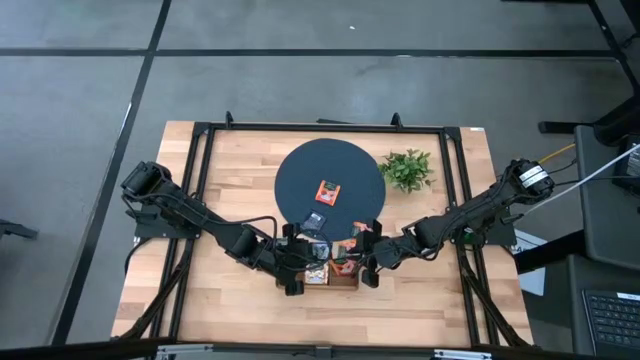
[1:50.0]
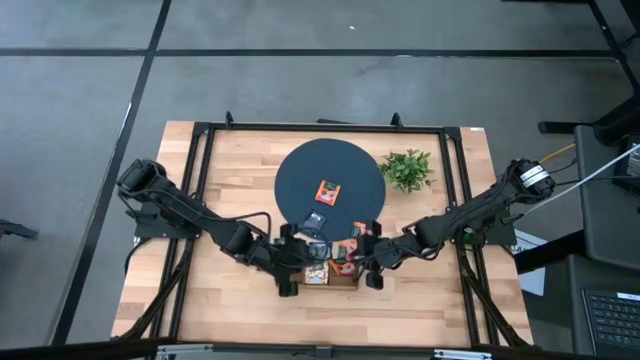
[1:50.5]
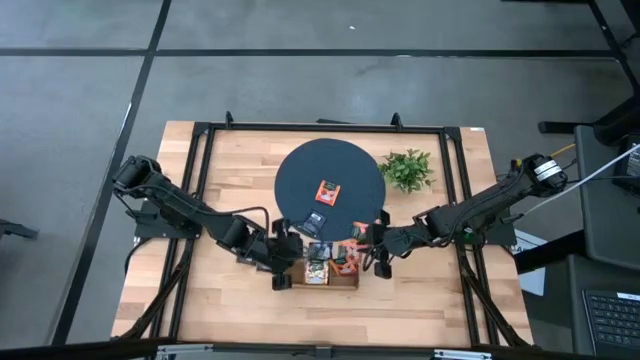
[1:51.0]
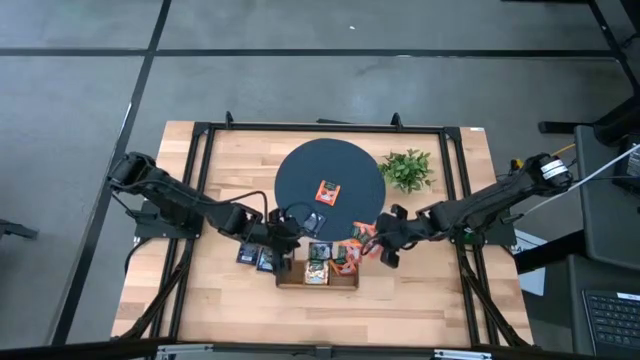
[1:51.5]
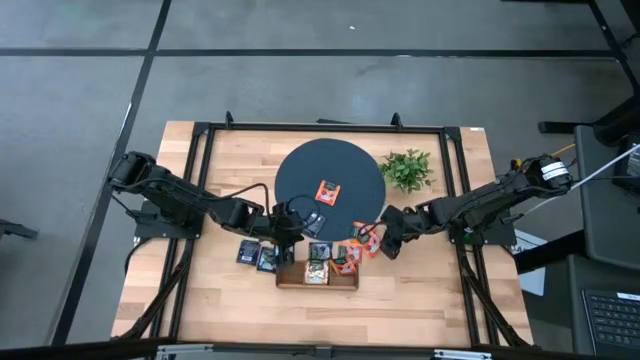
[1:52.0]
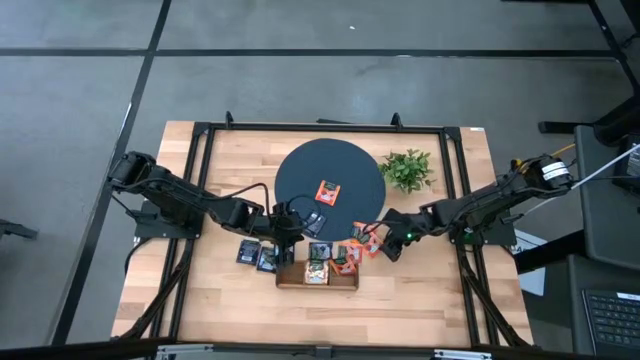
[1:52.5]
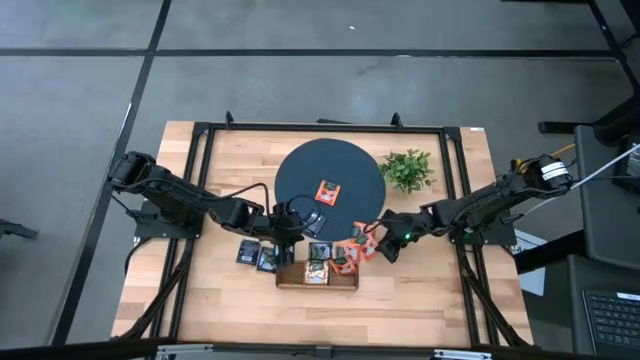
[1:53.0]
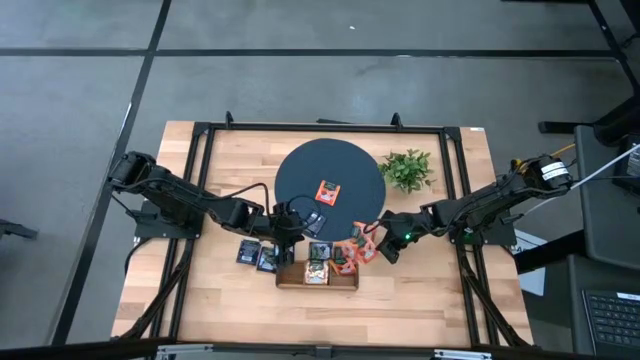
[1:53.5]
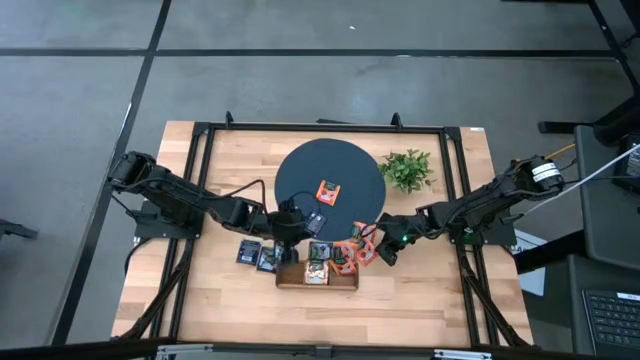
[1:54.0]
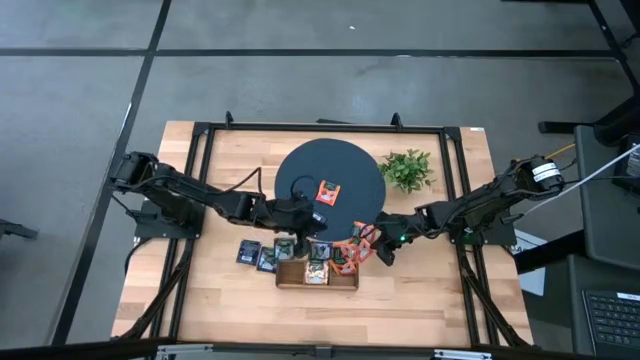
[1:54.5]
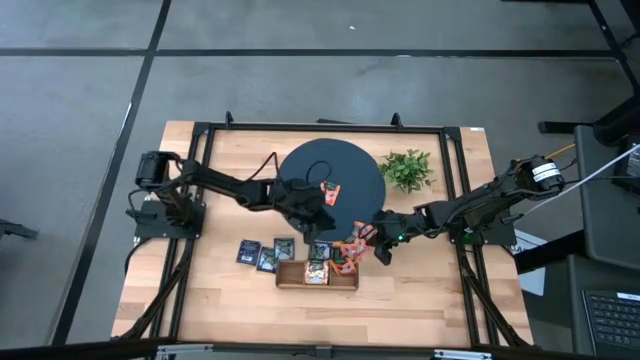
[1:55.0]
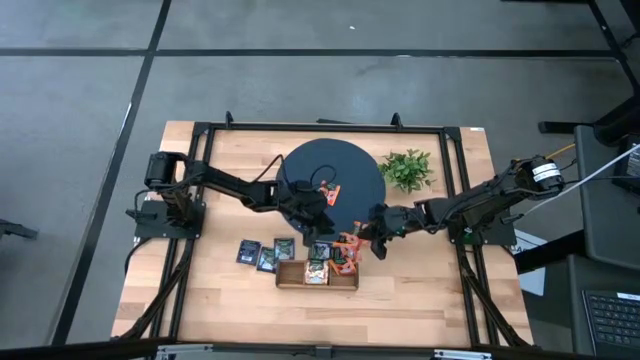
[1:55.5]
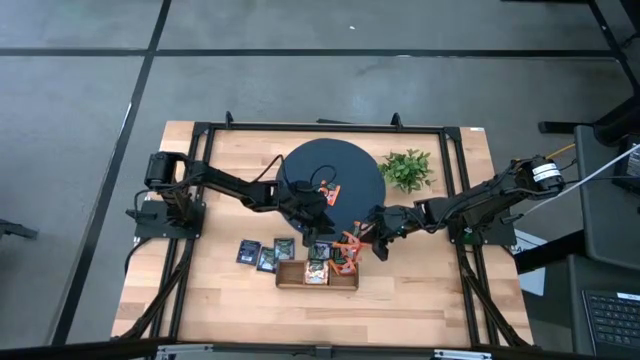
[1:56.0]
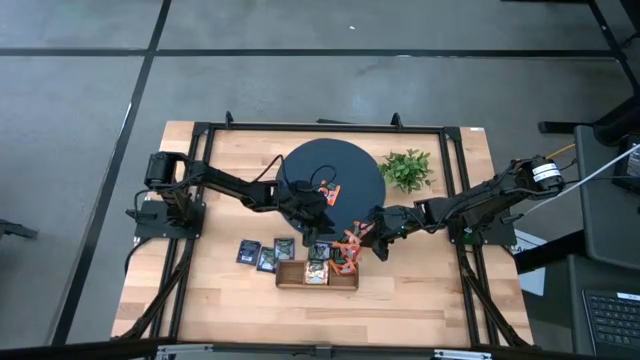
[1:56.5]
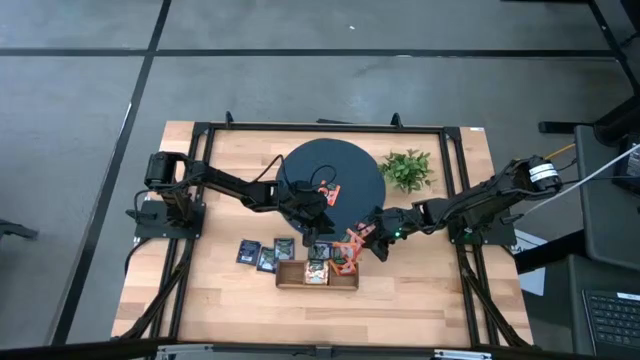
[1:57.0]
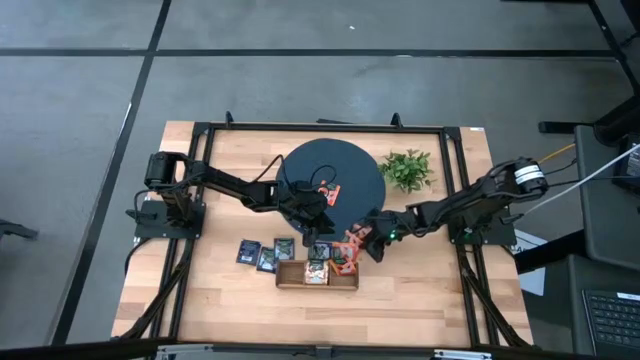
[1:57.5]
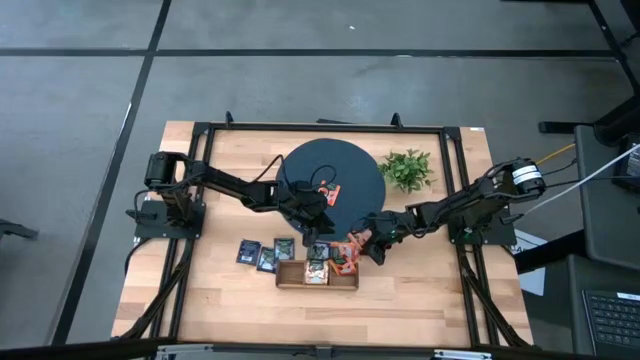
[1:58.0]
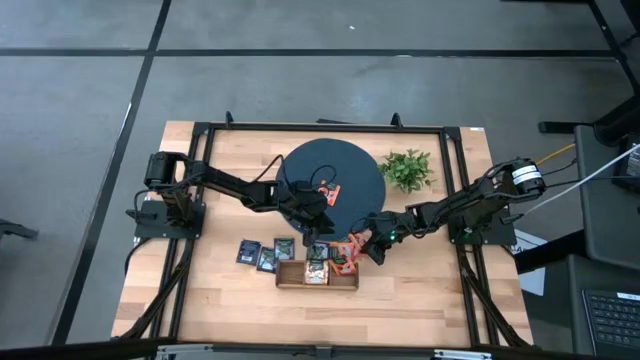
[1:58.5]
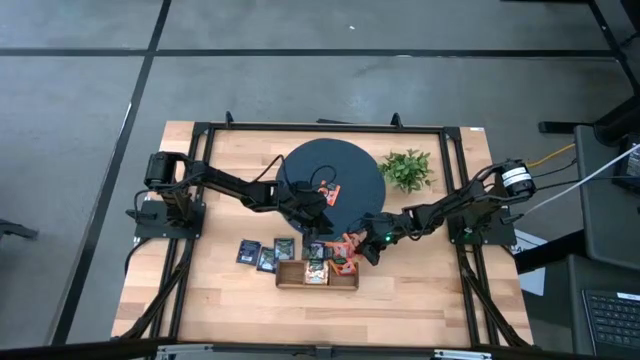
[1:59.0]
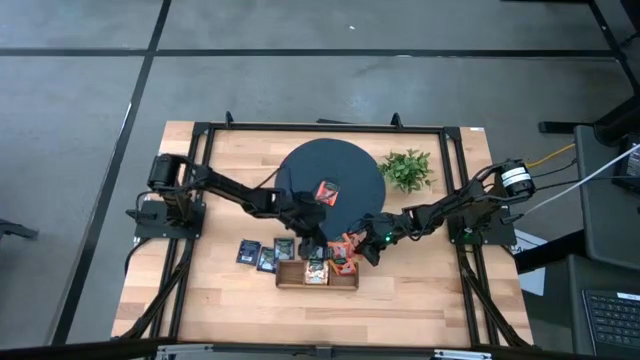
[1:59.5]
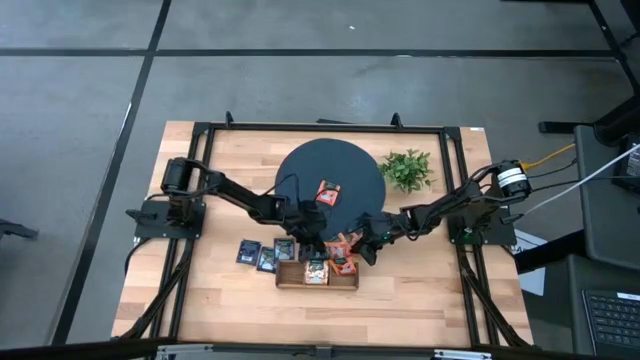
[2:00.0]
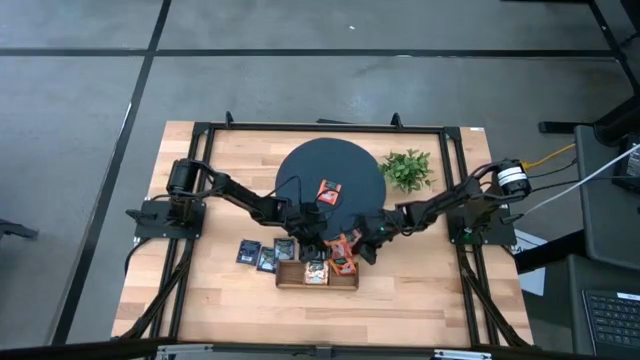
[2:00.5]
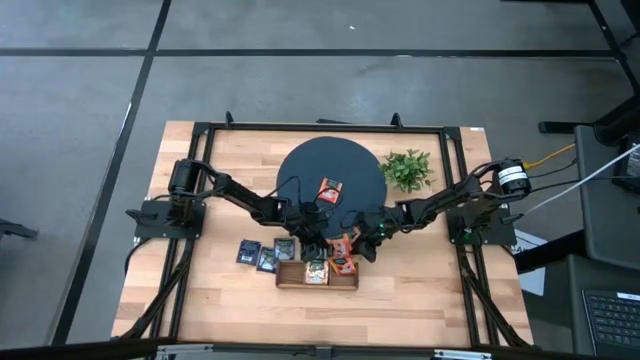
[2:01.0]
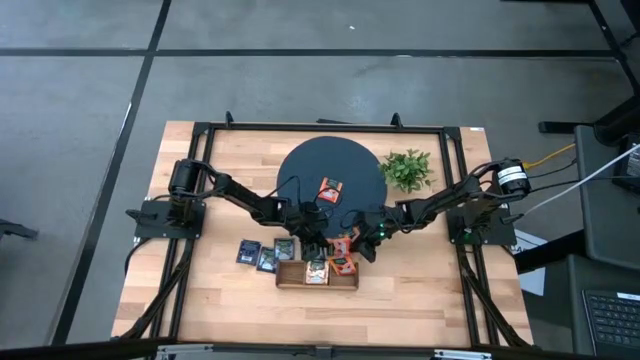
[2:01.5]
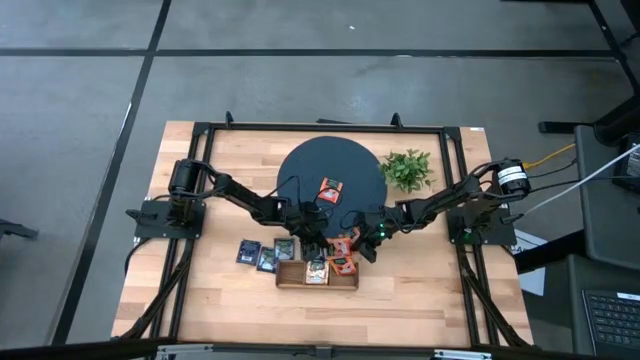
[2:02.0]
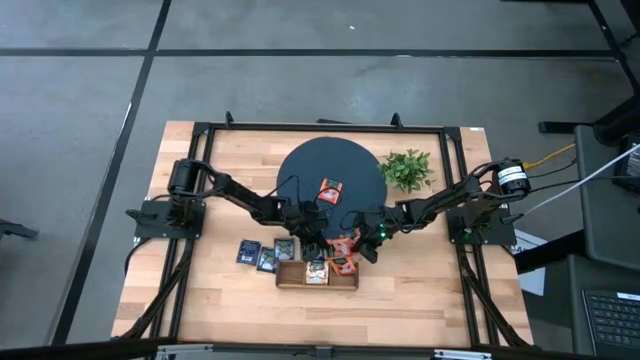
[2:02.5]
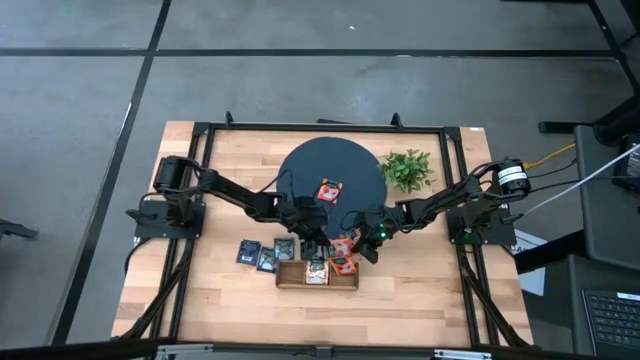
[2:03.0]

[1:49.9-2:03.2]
Task: Pick & Place Tea
Put the orange tea bag into the right section of the wooden organizer

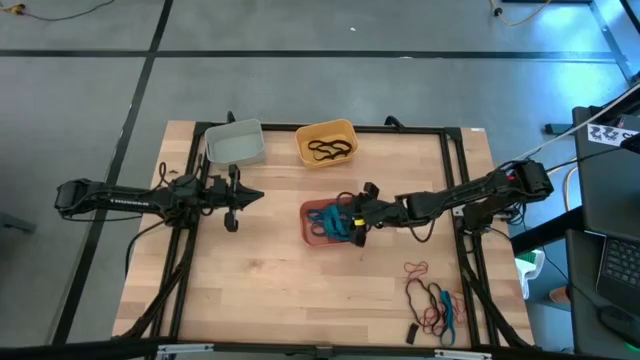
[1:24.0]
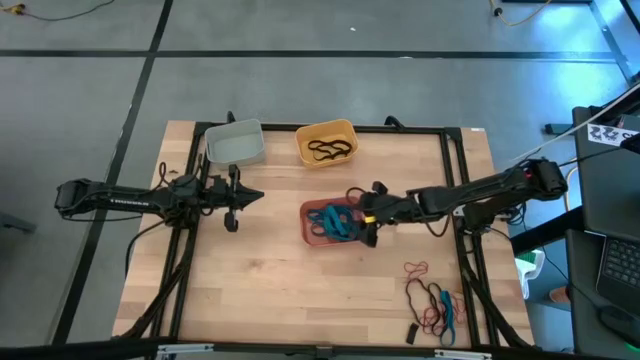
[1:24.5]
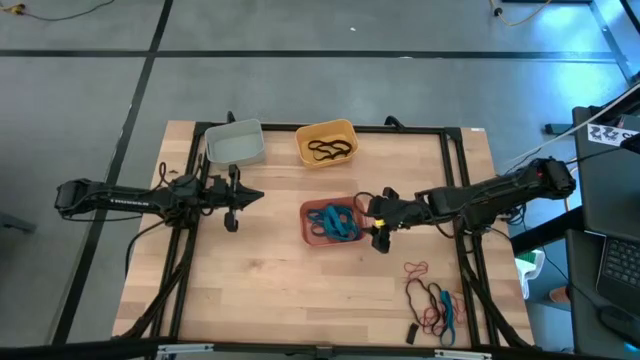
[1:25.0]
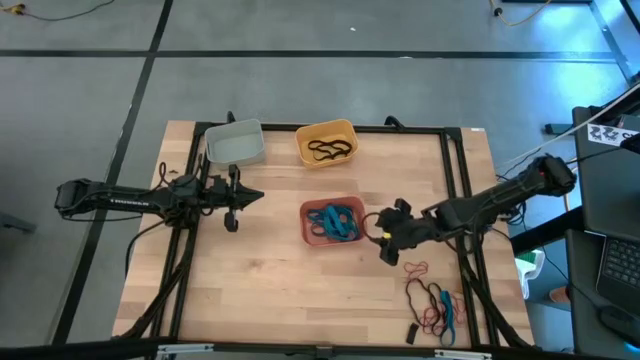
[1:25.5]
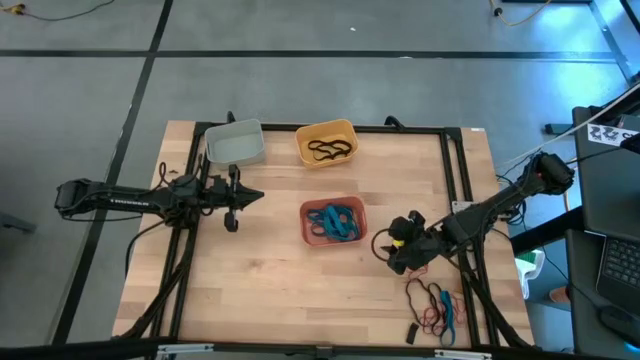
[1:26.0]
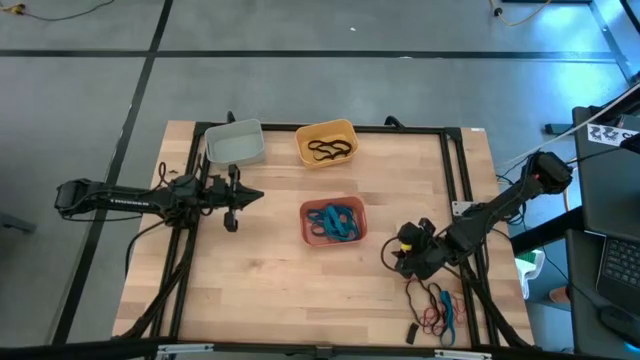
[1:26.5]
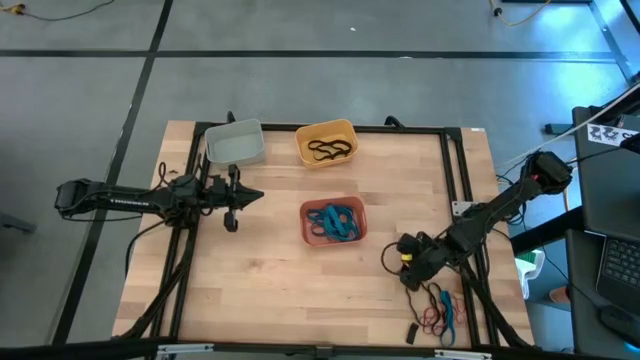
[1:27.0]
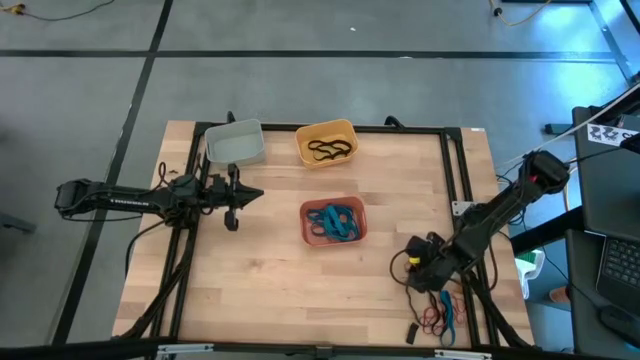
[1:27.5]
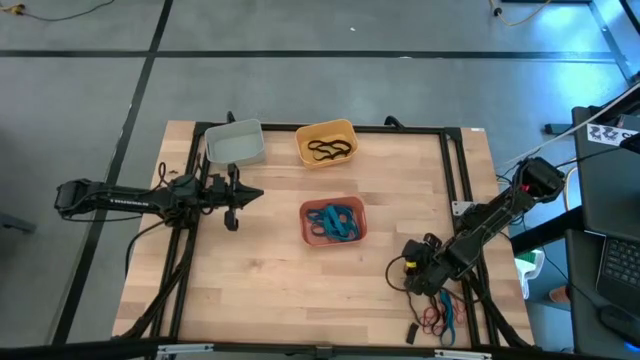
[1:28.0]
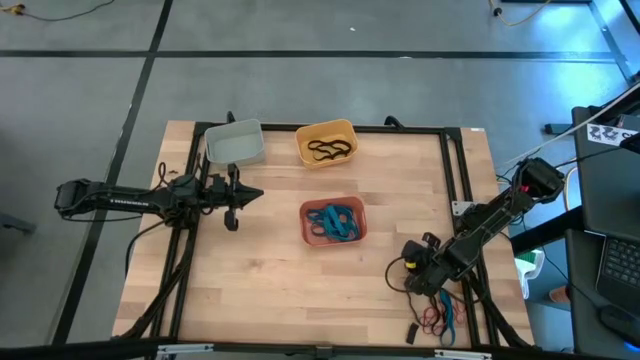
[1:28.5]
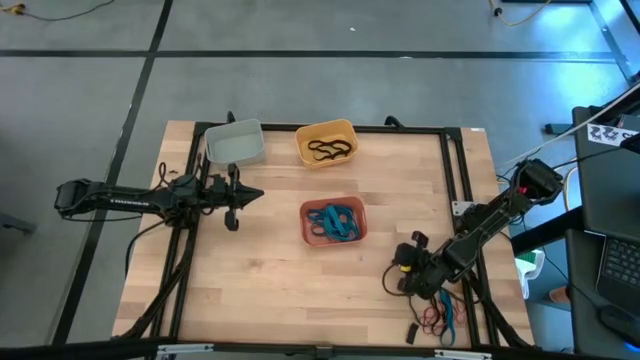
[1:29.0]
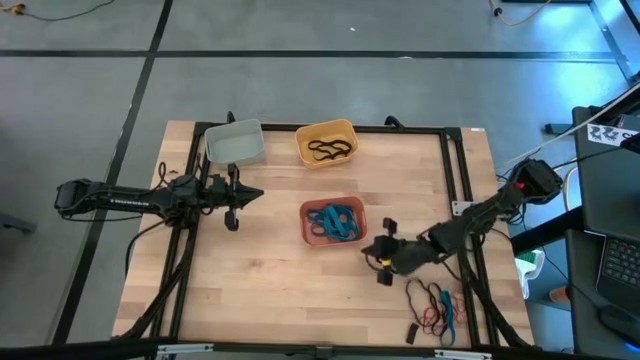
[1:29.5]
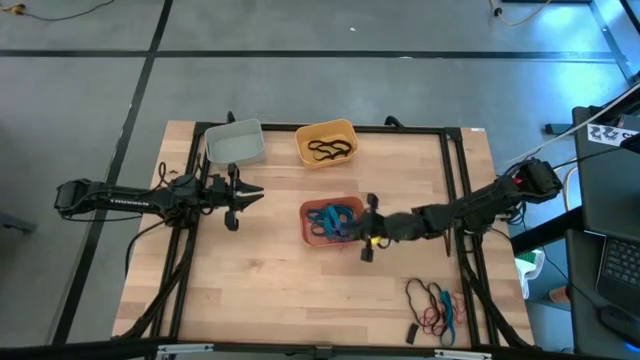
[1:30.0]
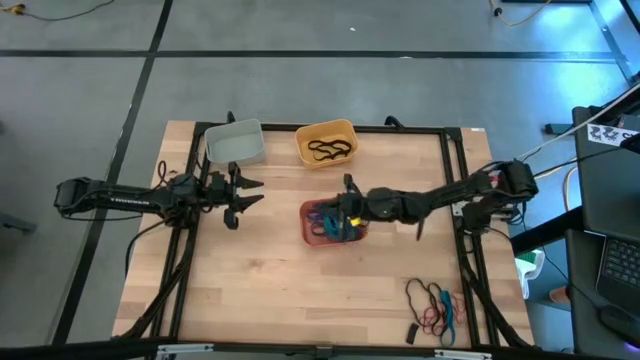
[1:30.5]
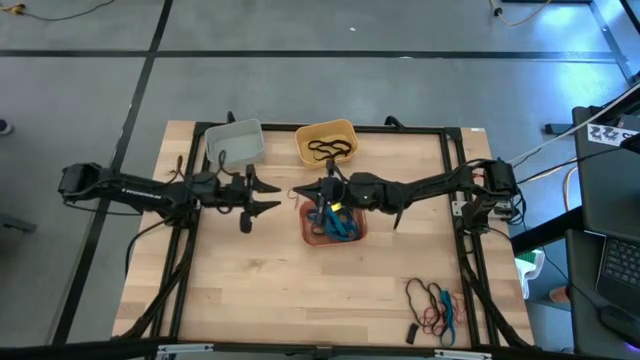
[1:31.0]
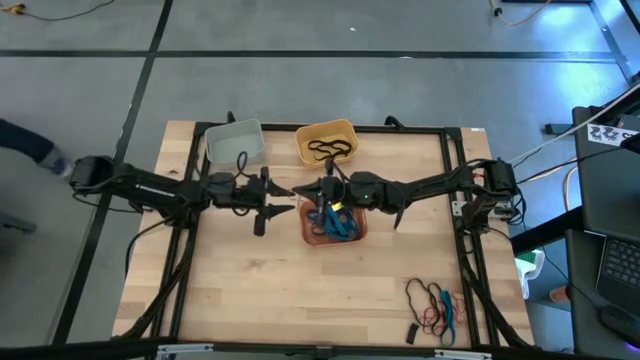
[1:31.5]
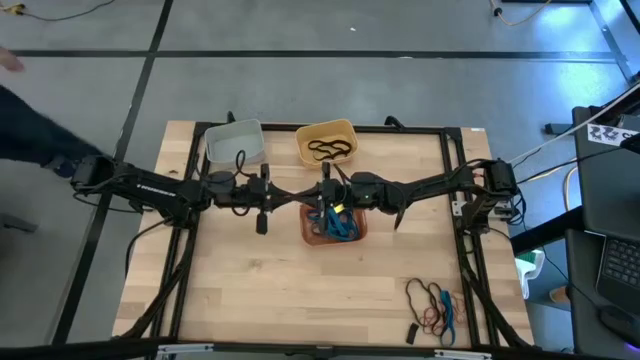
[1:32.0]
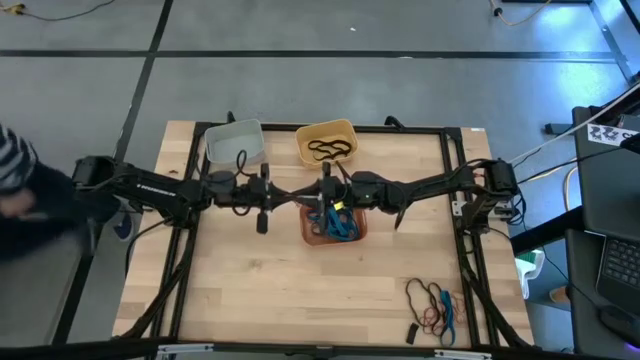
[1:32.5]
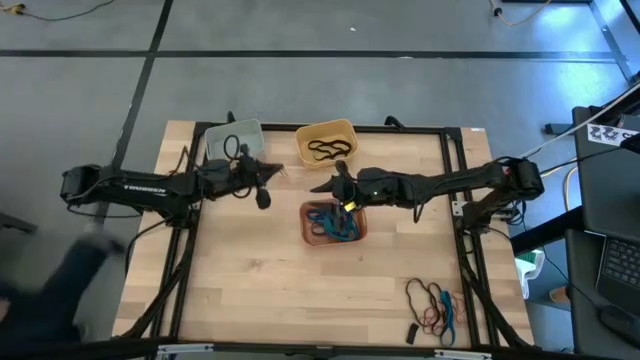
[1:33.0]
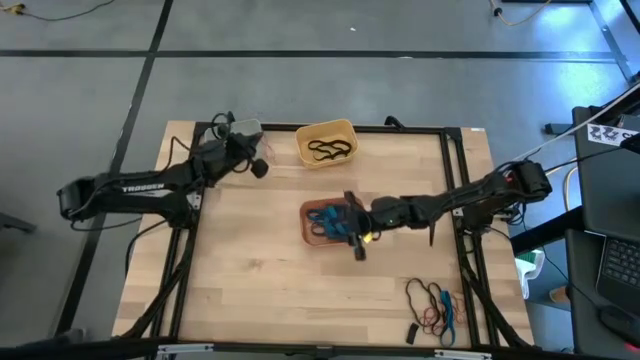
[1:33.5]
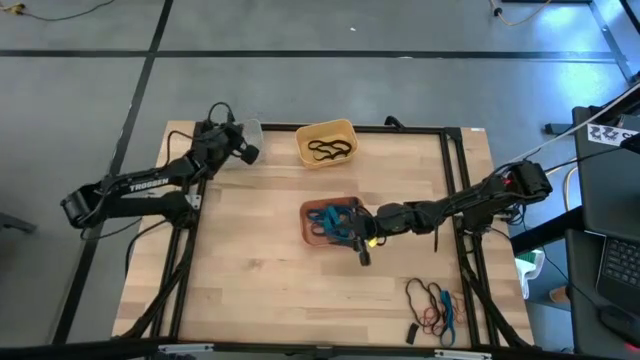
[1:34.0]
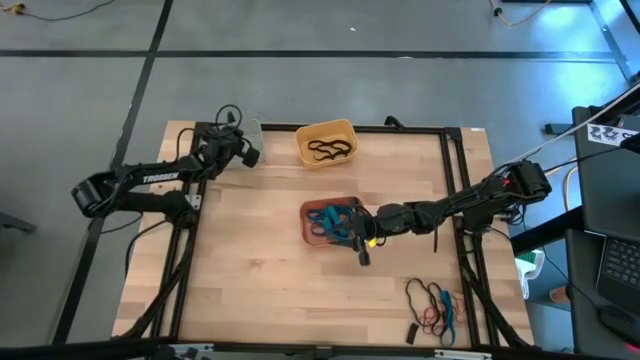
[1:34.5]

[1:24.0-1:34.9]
Task: Sort rubber bands into baskets
Put the red rubber band into the gray bin
